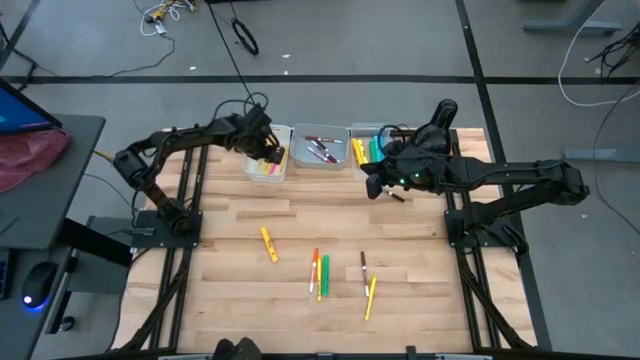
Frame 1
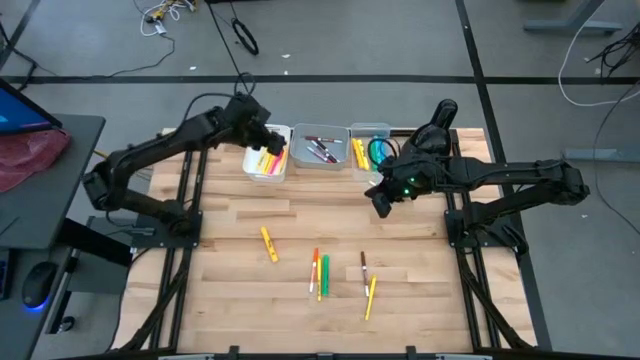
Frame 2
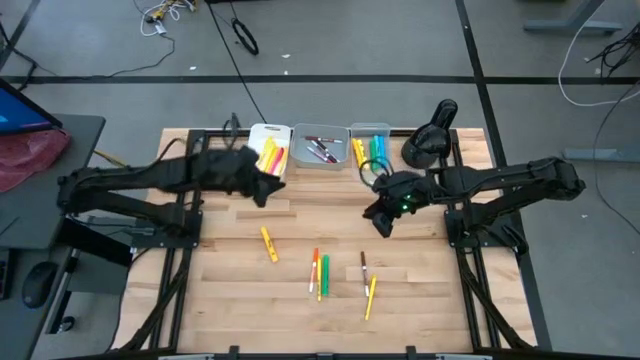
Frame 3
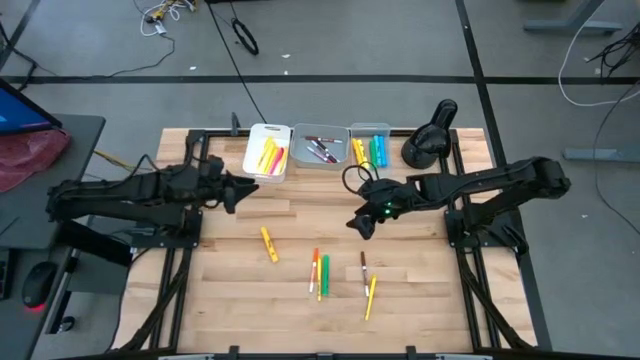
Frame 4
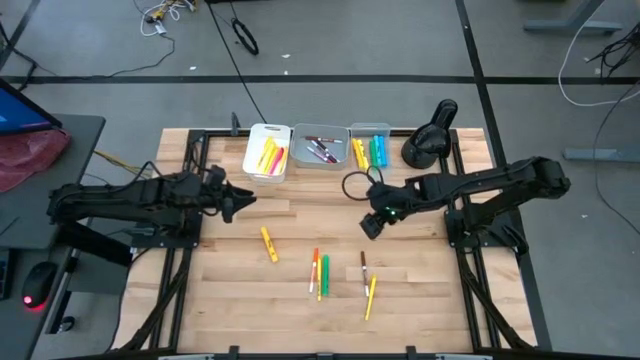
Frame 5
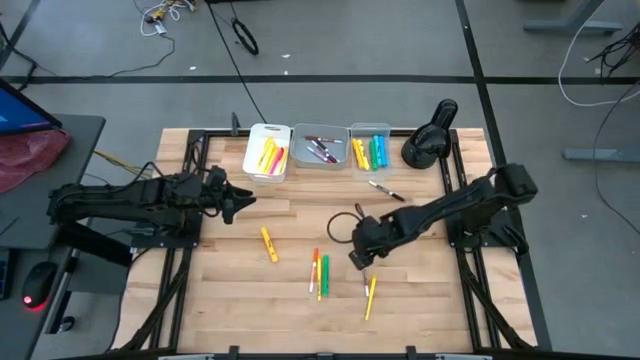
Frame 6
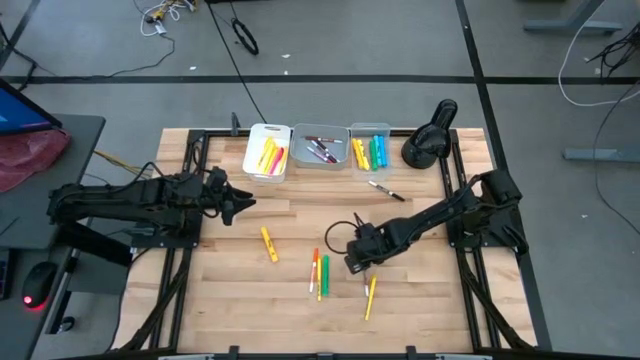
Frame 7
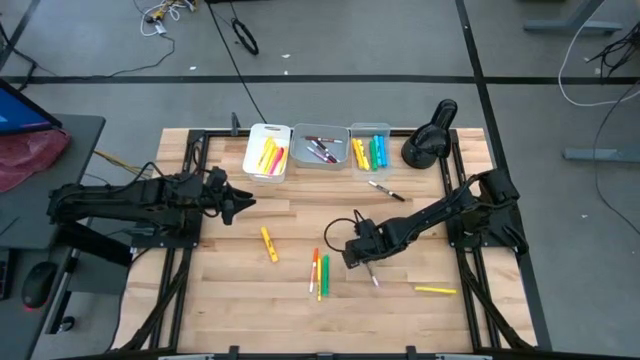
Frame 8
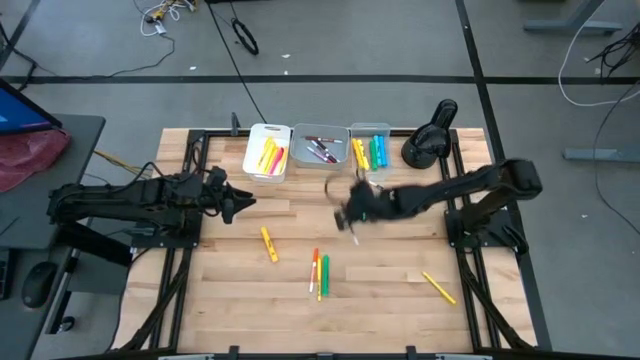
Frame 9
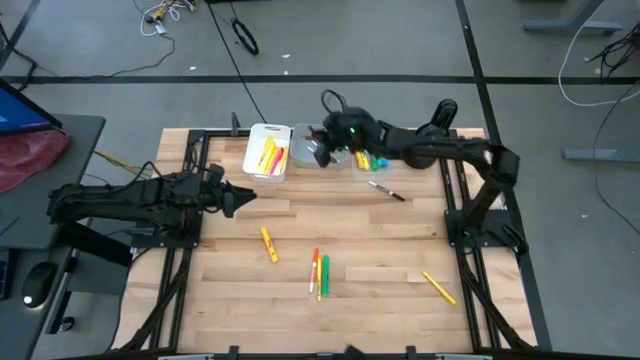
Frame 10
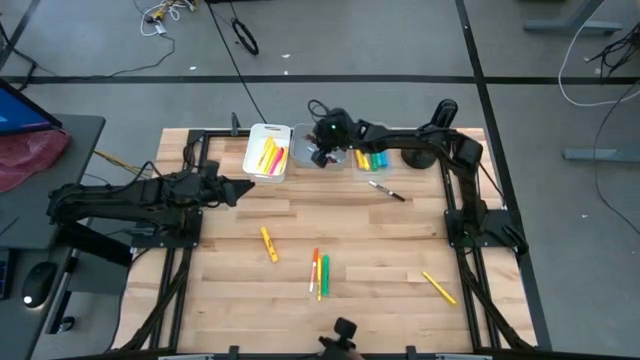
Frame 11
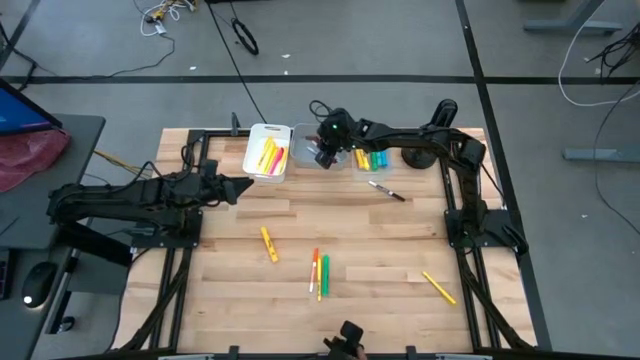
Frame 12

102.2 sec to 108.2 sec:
Task: Pick & Place Markers
Put the brown marker pen into the gray bin

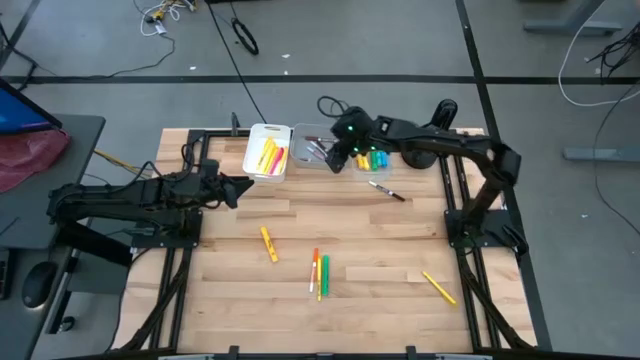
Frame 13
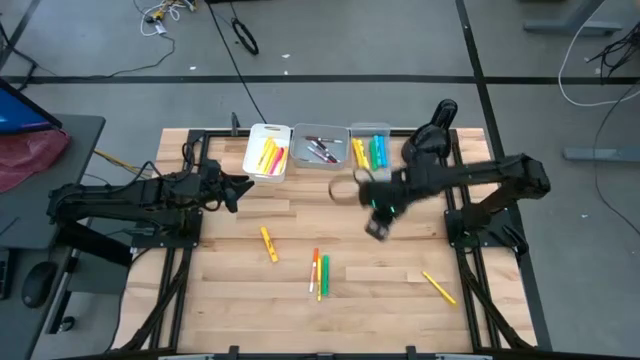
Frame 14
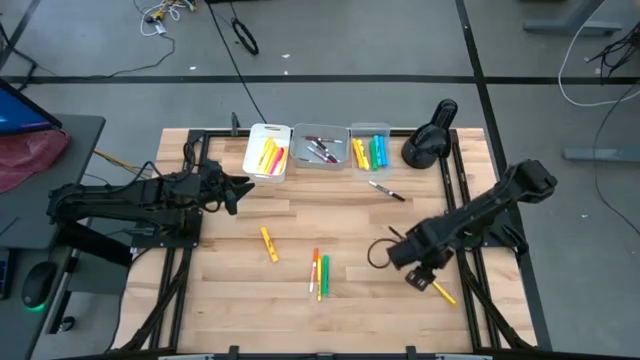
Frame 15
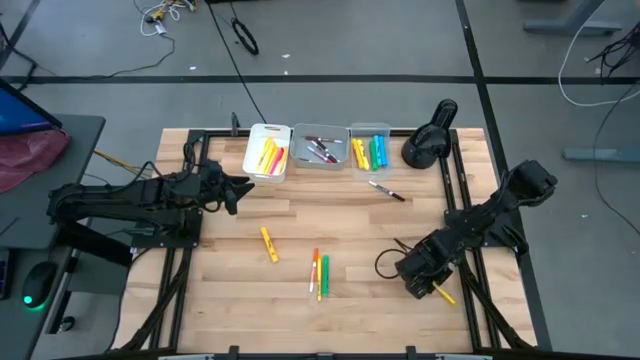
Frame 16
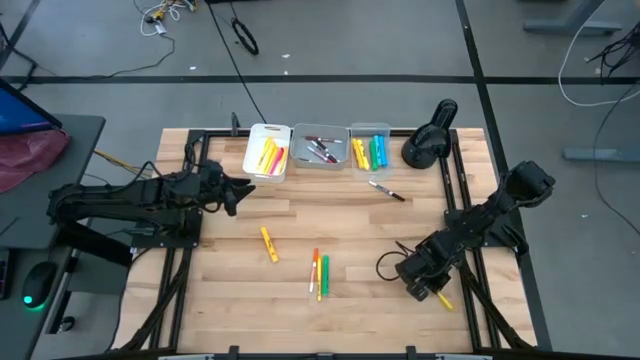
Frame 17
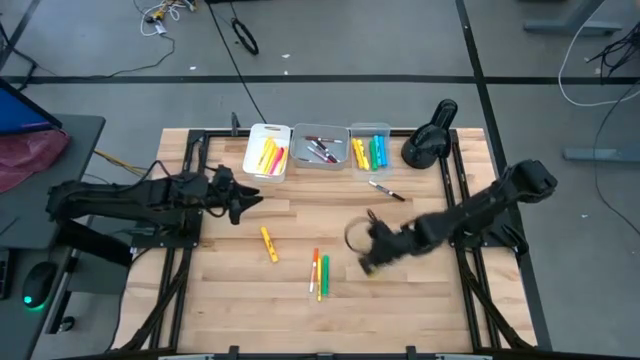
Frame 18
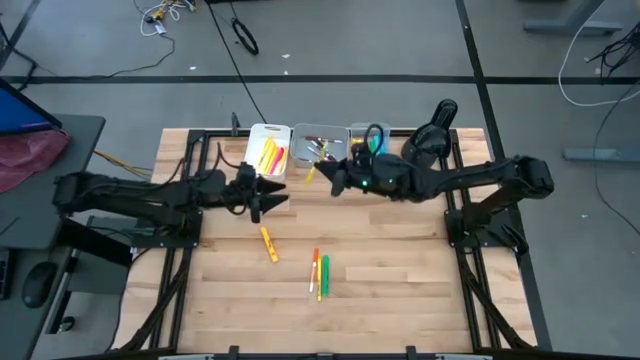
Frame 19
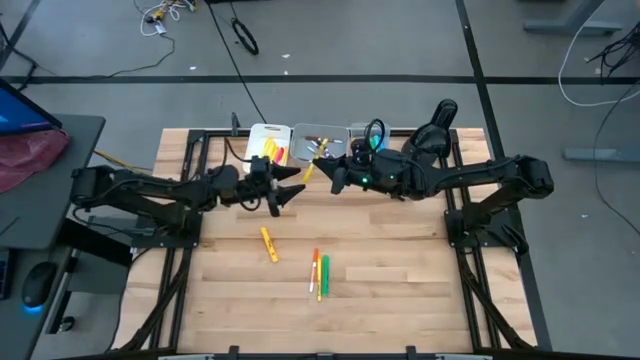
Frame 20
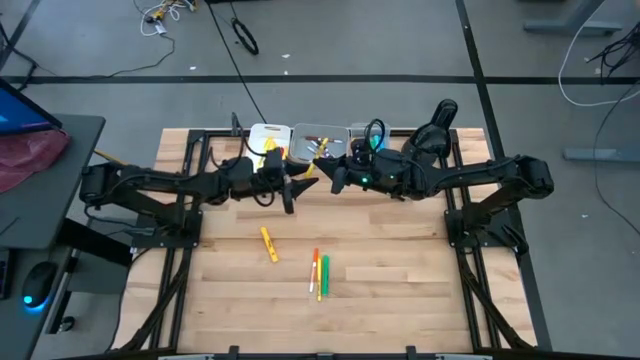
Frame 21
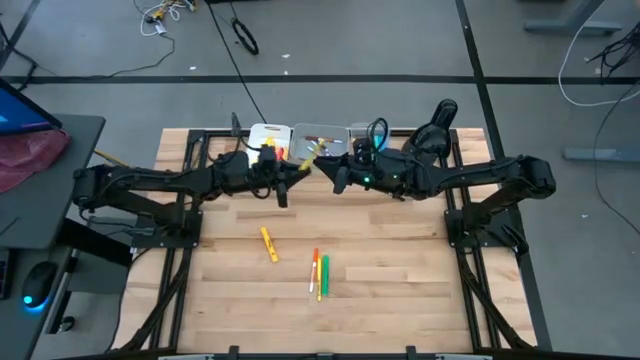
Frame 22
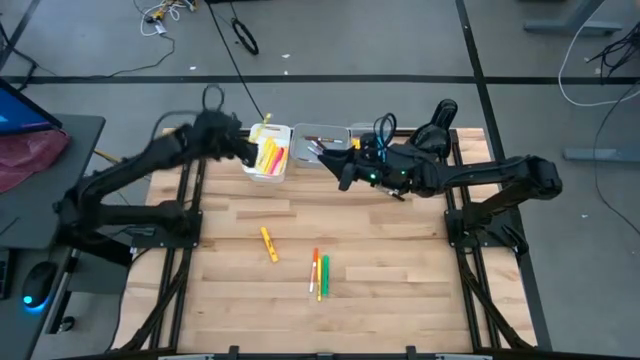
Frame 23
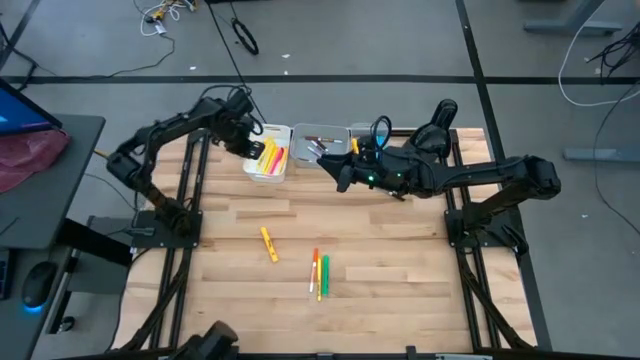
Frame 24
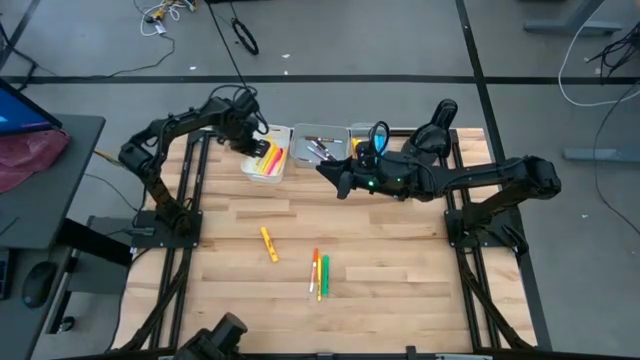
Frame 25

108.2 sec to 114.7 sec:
Put the yellow pen into the white bin

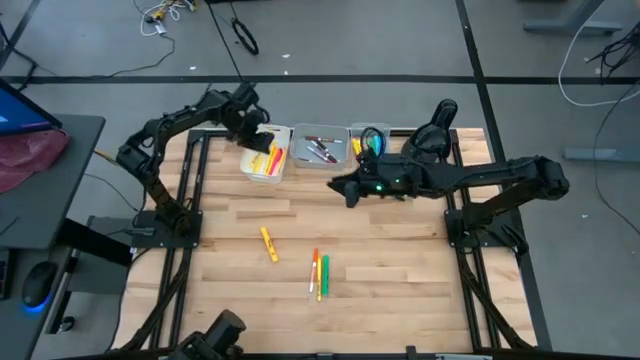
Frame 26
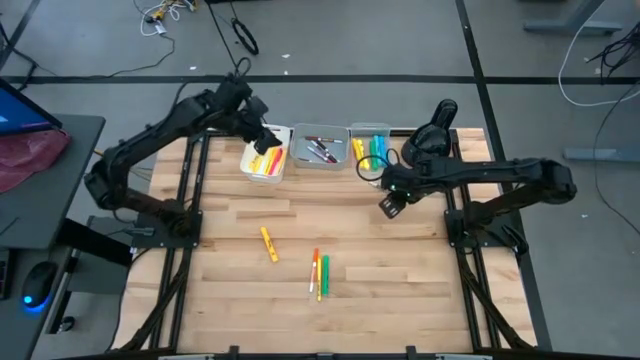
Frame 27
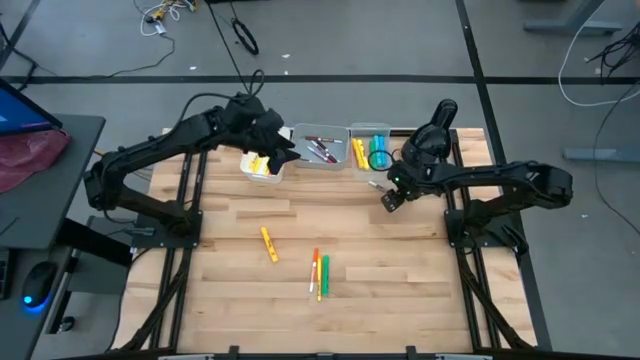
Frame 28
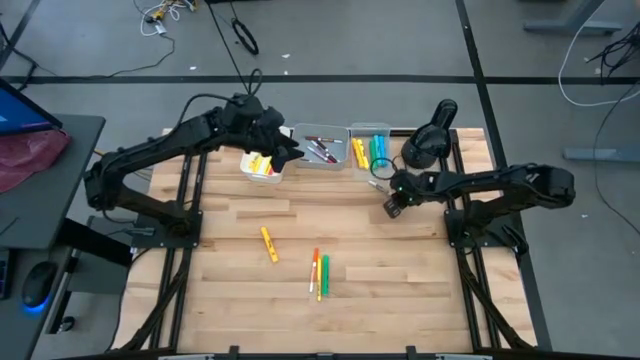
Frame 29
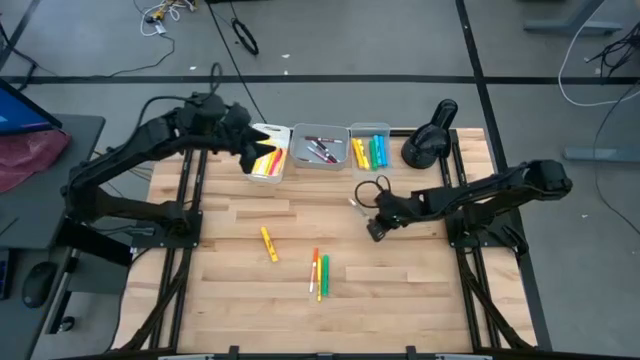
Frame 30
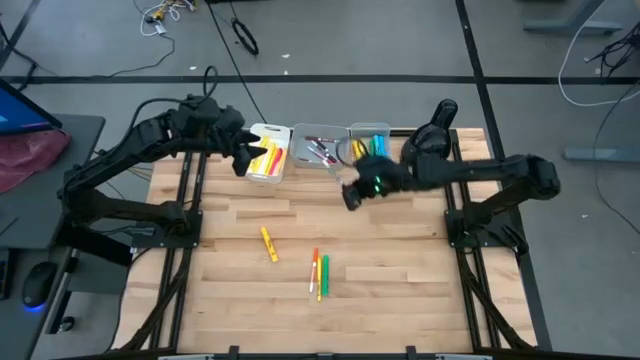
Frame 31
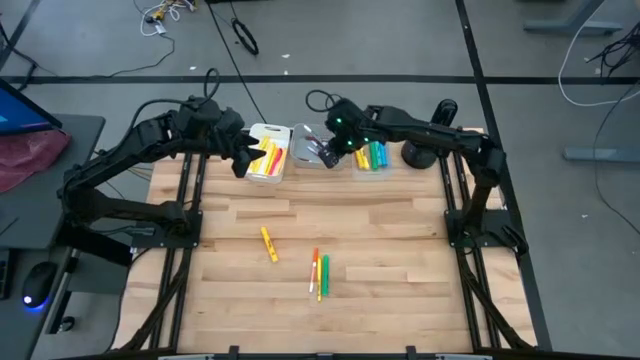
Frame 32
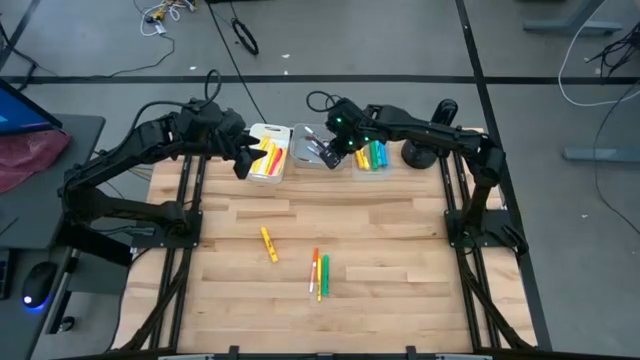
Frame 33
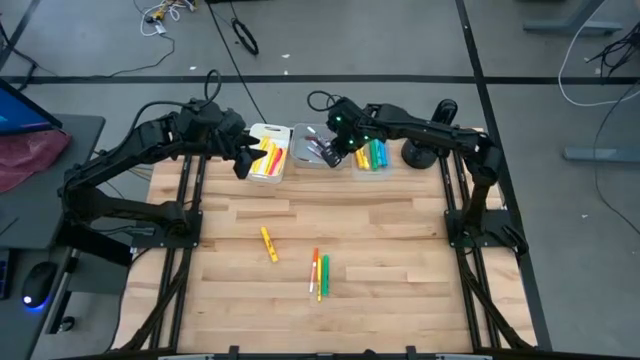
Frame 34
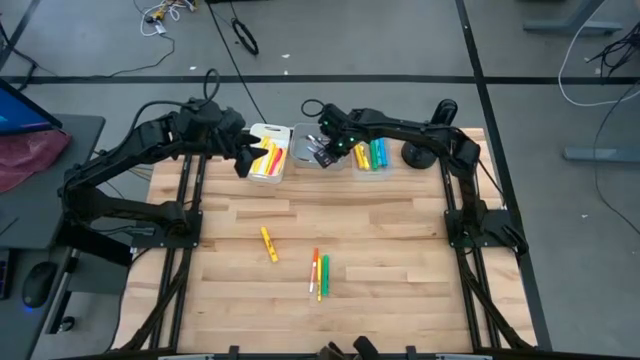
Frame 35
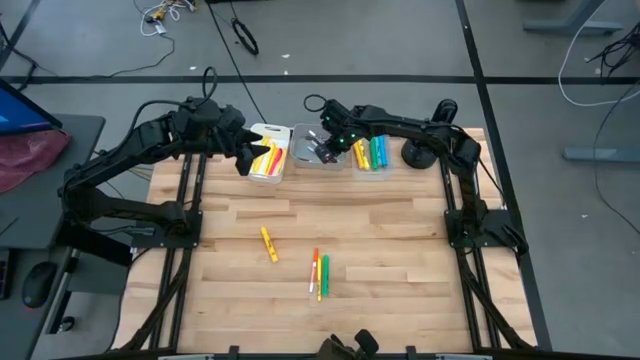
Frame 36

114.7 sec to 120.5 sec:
Put the black marker pen into the gray bin

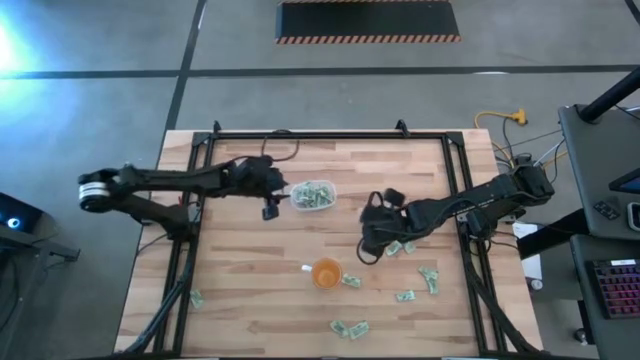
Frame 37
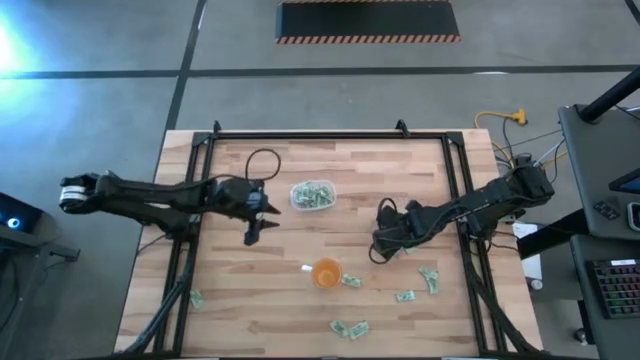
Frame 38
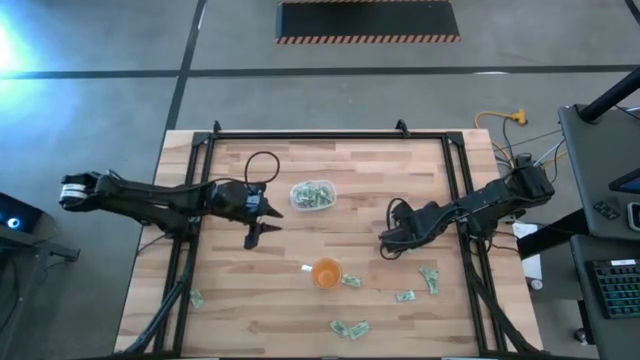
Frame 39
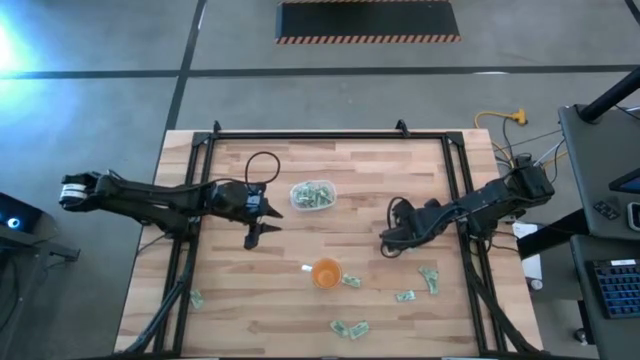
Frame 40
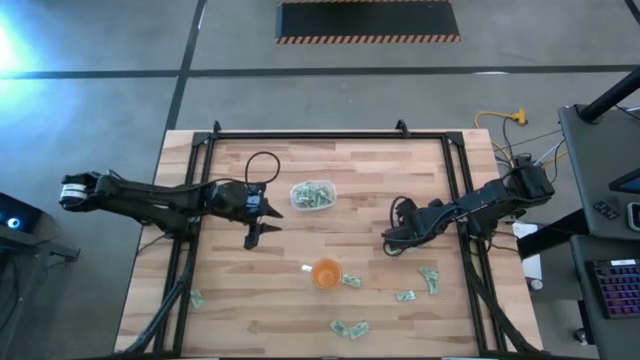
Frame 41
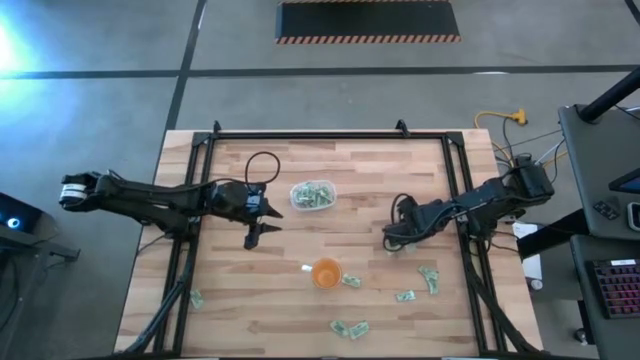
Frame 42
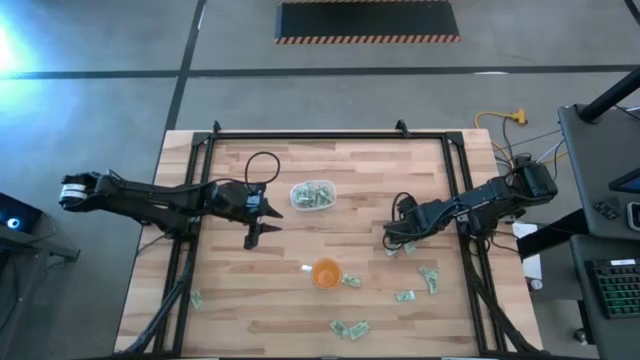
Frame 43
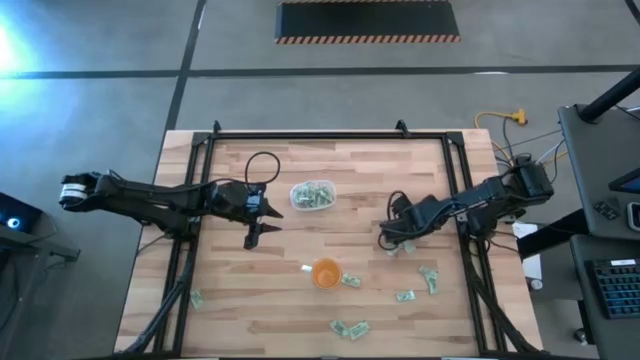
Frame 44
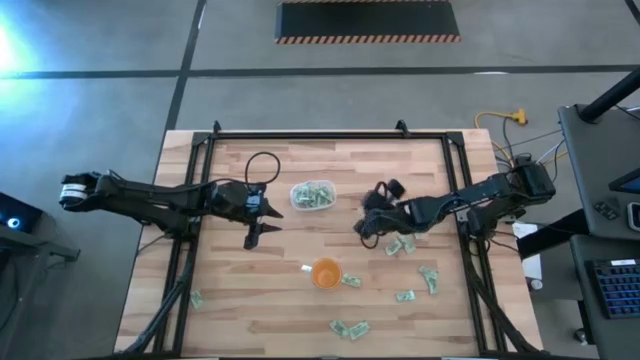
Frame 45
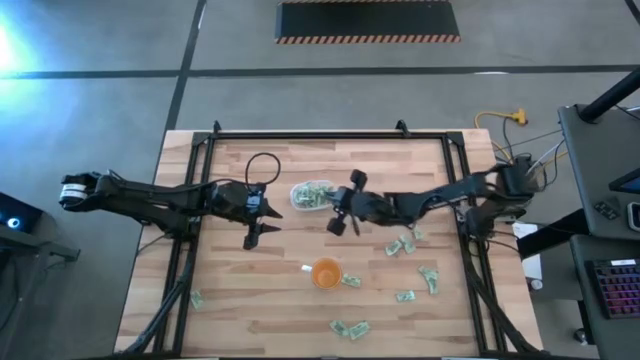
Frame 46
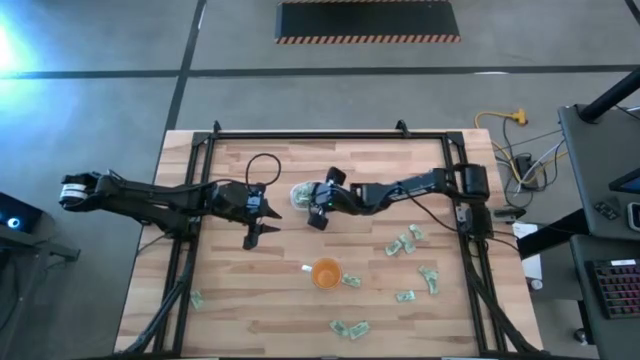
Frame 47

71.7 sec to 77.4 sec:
Task: Pick and place Stevia / Truvia into bins
Put the stevia packet into the transparent bin
